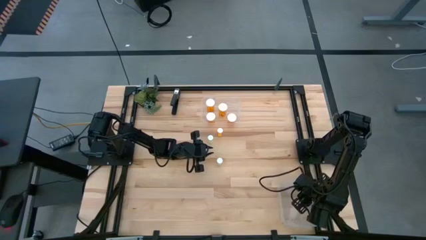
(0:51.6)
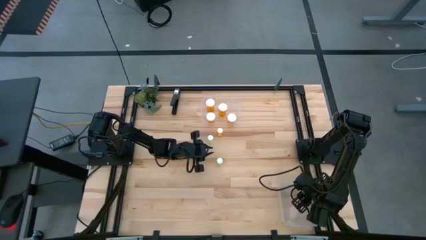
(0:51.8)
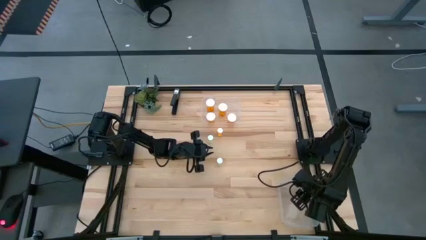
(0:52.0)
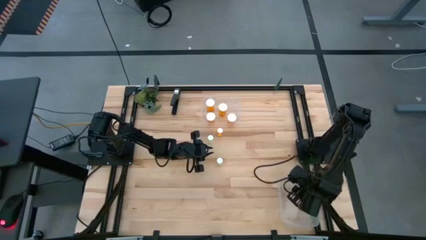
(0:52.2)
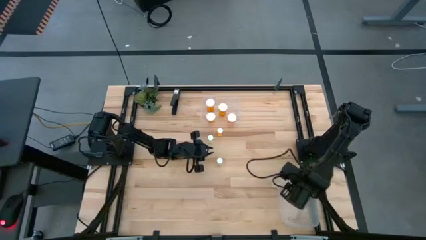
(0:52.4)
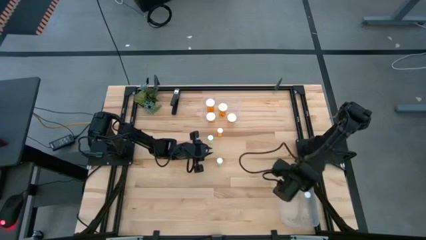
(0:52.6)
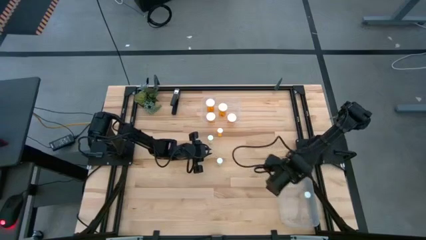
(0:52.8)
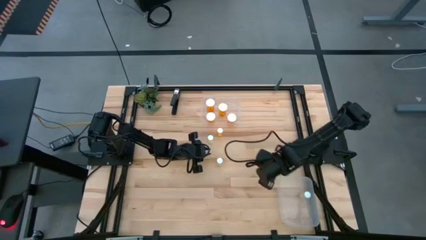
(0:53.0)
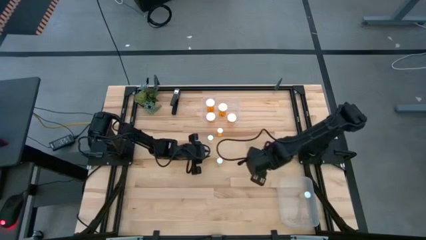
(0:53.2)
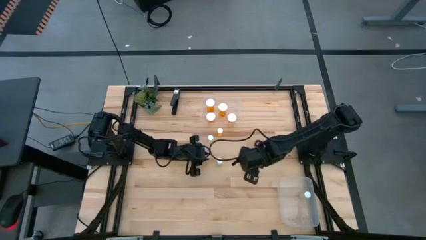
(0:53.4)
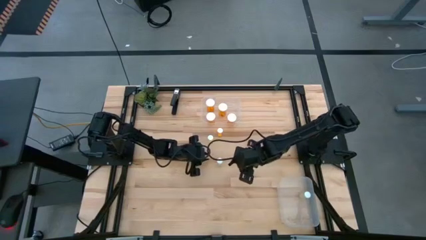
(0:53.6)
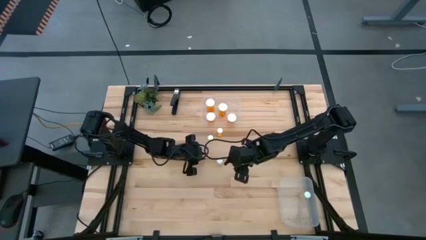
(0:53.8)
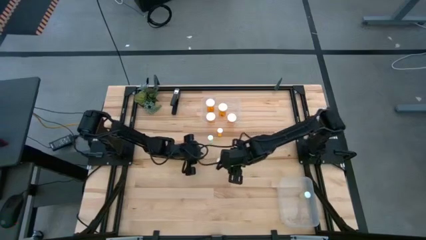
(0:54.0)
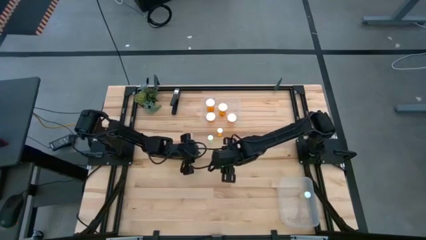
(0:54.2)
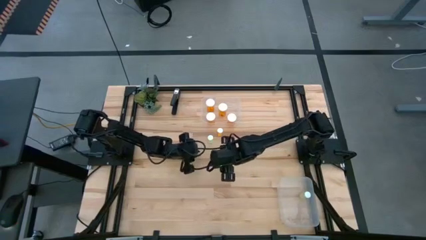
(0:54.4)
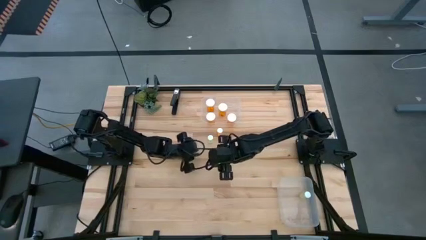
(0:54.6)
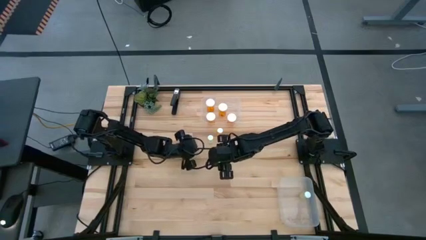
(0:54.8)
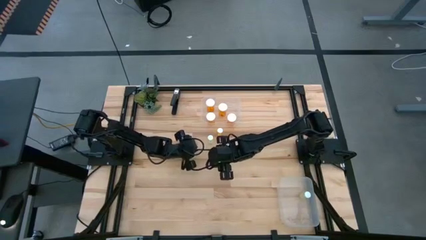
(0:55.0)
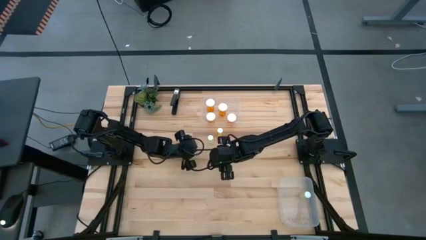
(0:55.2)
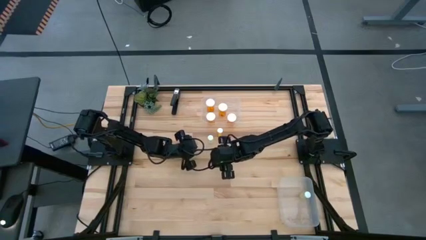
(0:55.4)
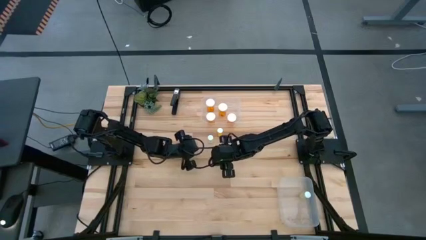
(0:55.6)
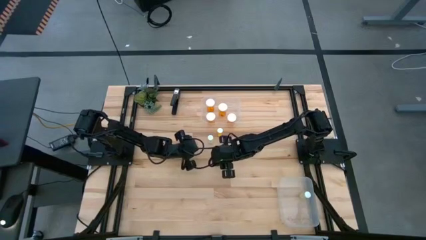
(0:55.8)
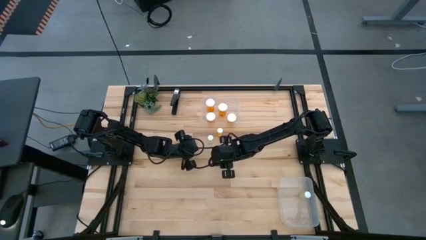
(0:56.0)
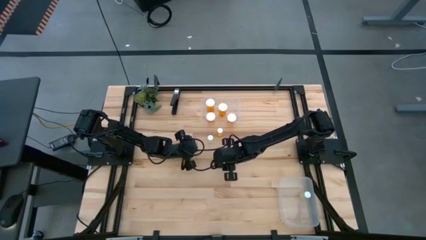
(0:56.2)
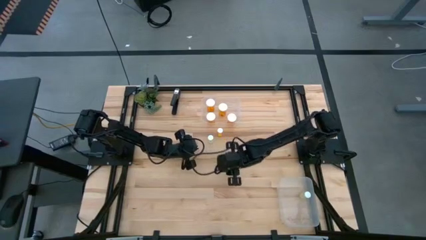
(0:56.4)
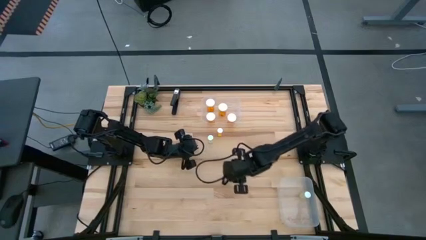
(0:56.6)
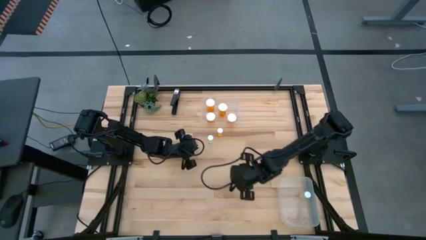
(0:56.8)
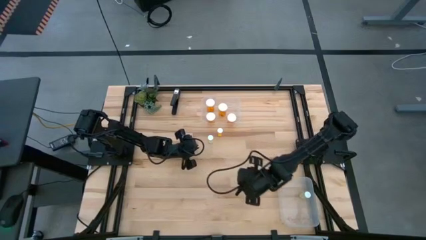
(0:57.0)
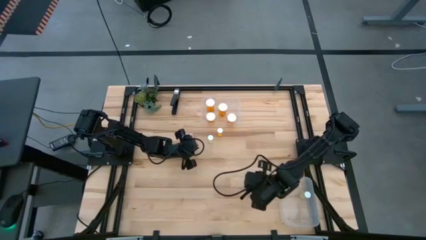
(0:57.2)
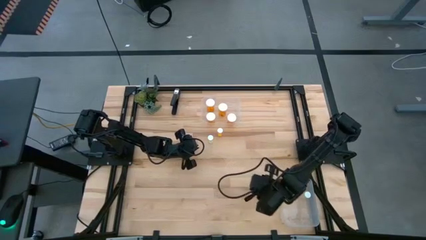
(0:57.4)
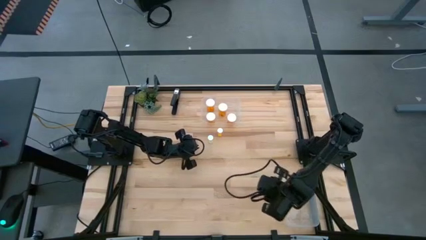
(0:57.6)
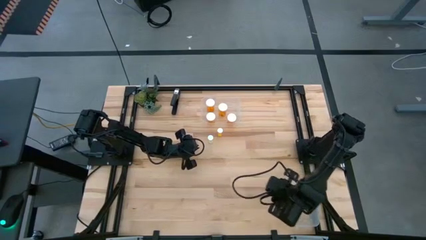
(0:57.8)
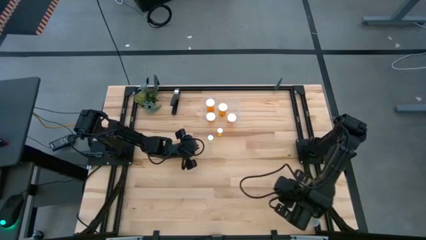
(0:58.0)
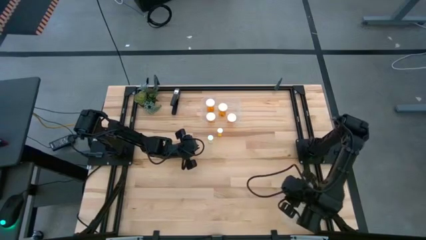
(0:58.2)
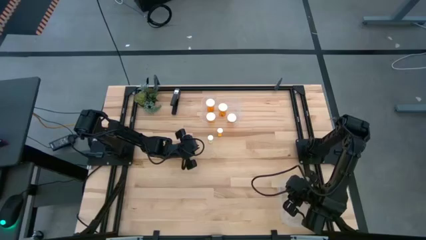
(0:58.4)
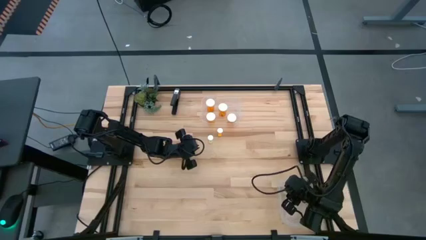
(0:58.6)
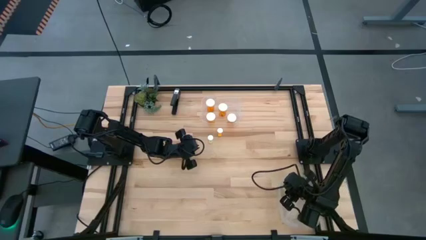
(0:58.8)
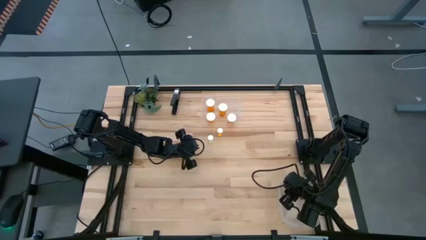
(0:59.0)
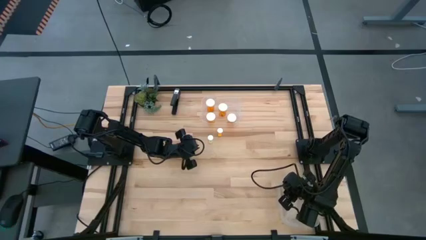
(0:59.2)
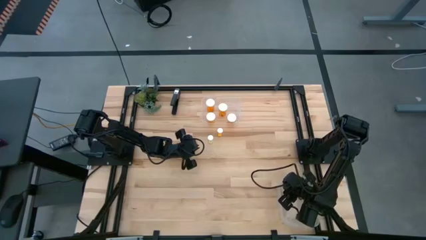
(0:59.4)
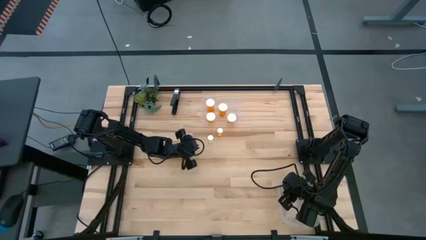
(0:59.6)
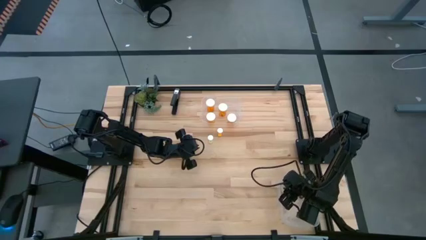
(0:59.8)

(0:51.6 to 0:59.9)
Task: Pick and place medicine bottles into bin by pill shape (circle, oval)
Put the yellow tablet bottle into the bottom transparent bin

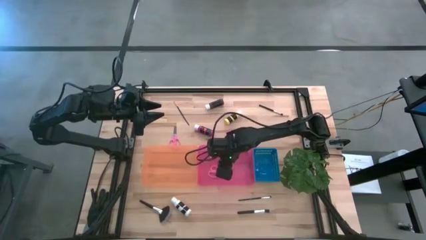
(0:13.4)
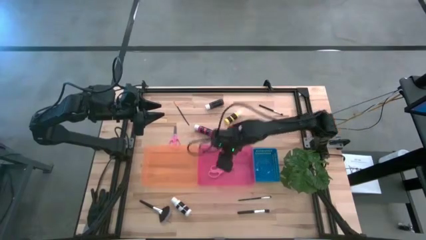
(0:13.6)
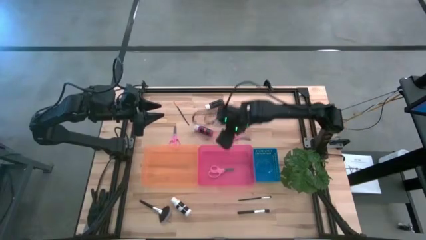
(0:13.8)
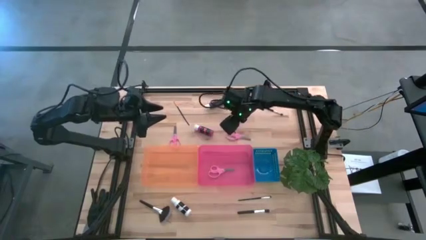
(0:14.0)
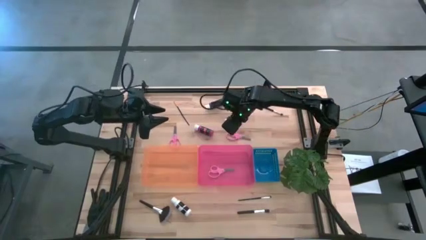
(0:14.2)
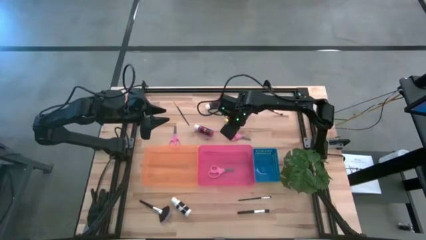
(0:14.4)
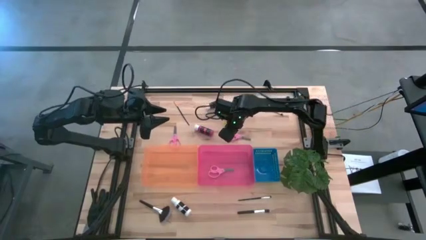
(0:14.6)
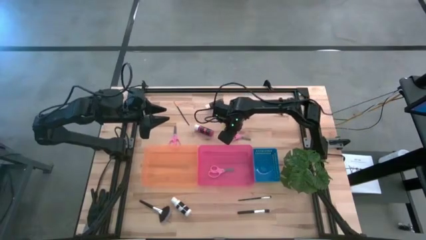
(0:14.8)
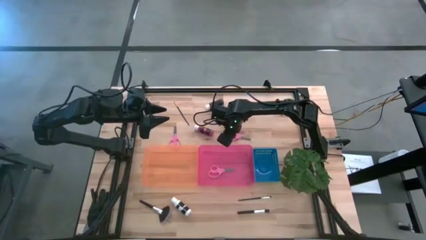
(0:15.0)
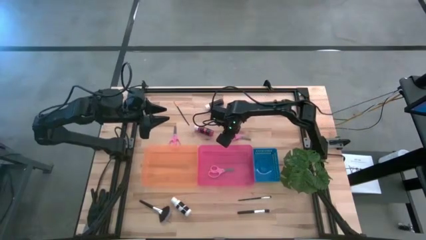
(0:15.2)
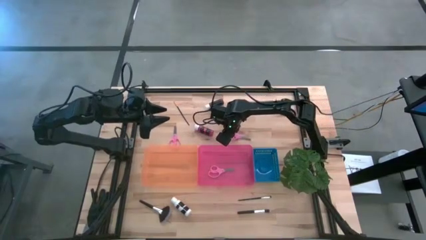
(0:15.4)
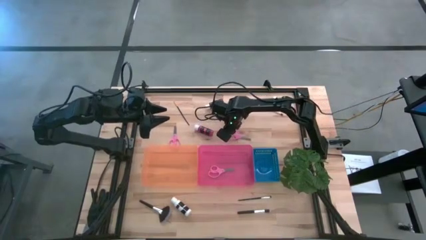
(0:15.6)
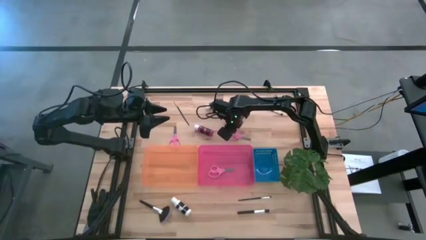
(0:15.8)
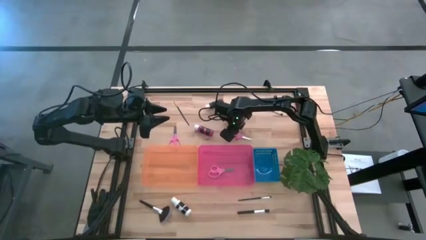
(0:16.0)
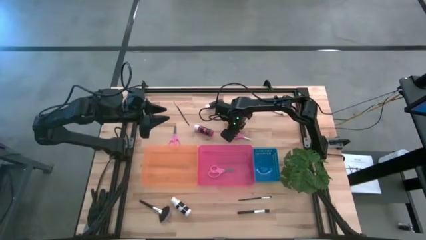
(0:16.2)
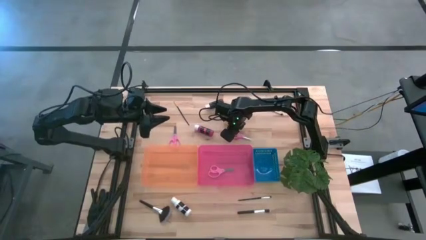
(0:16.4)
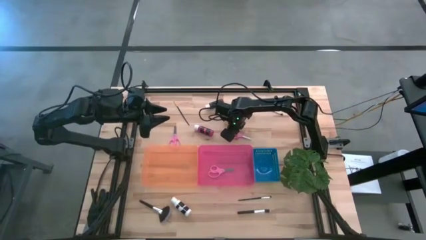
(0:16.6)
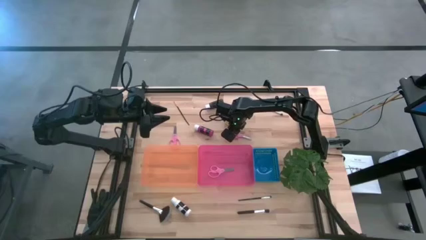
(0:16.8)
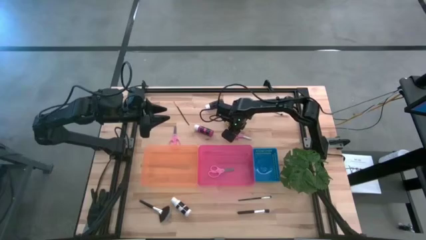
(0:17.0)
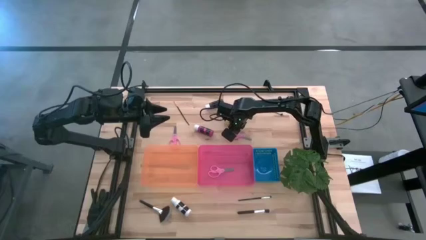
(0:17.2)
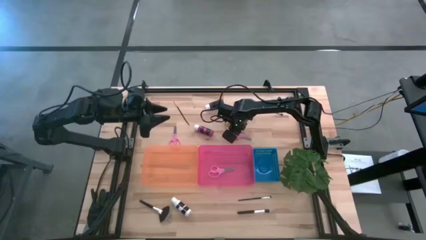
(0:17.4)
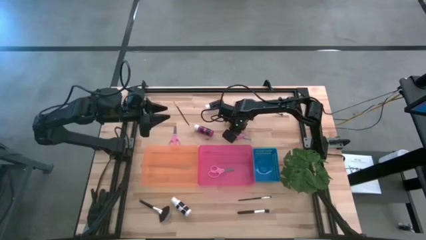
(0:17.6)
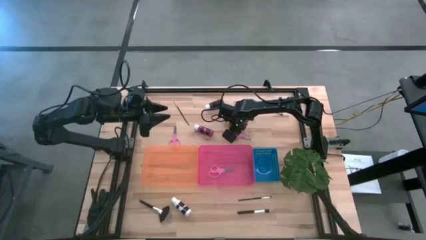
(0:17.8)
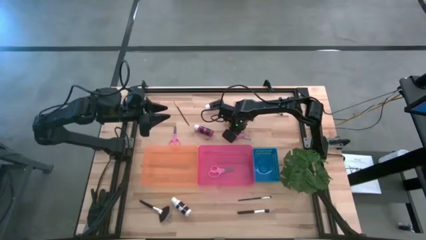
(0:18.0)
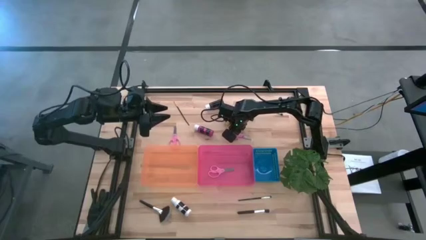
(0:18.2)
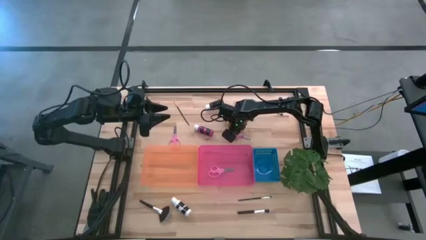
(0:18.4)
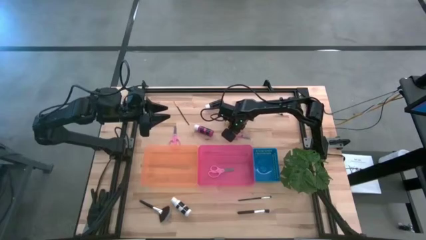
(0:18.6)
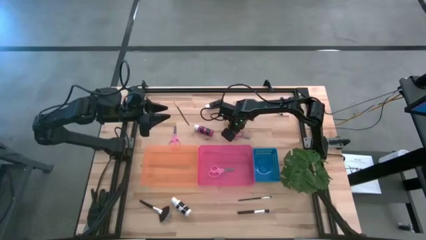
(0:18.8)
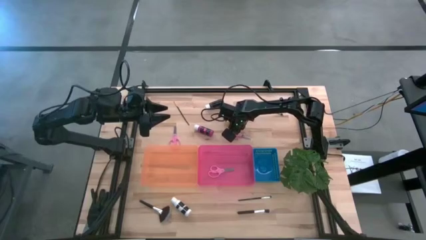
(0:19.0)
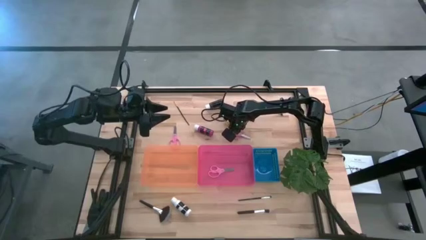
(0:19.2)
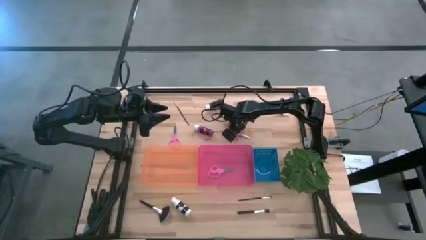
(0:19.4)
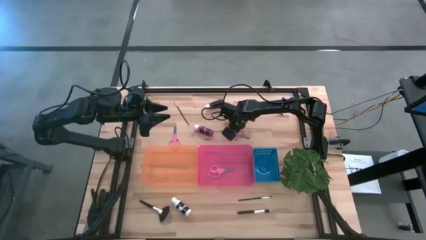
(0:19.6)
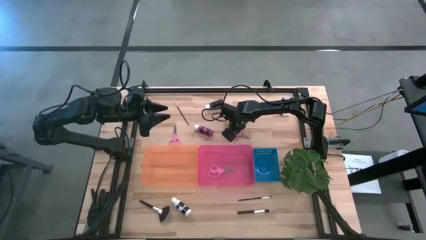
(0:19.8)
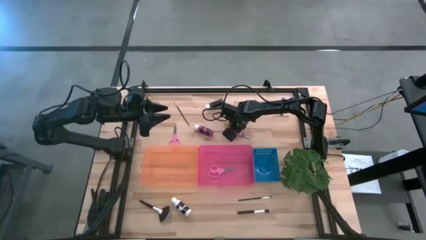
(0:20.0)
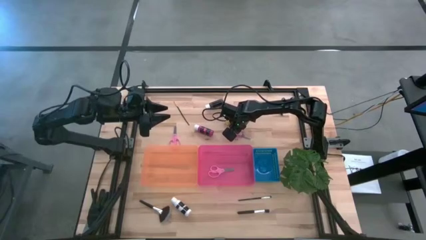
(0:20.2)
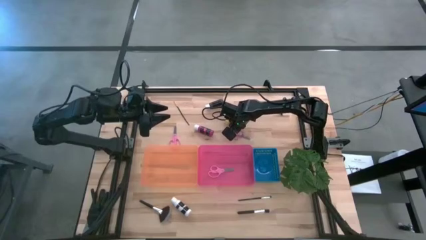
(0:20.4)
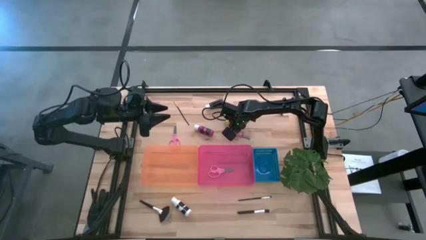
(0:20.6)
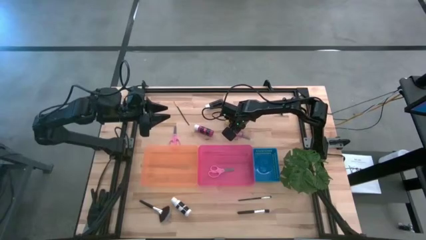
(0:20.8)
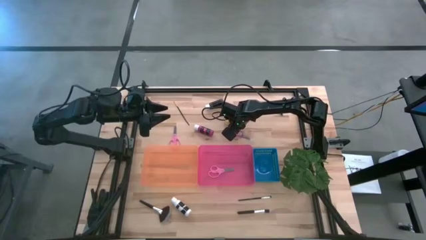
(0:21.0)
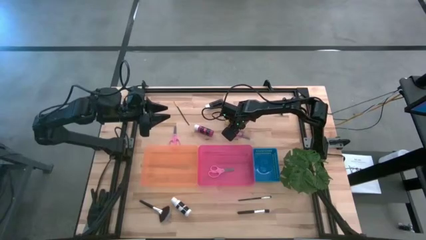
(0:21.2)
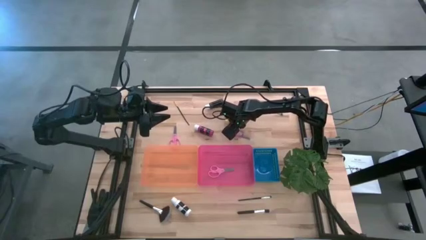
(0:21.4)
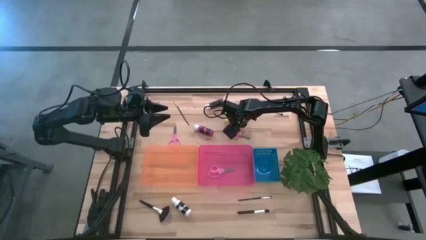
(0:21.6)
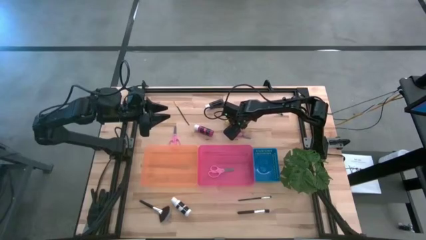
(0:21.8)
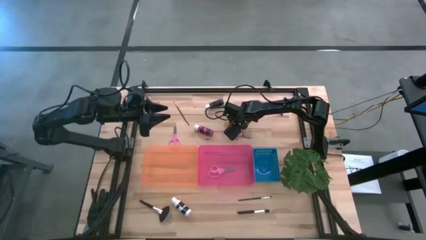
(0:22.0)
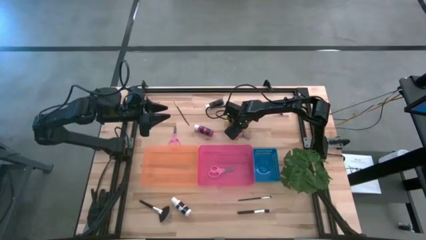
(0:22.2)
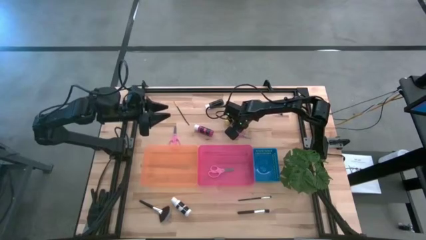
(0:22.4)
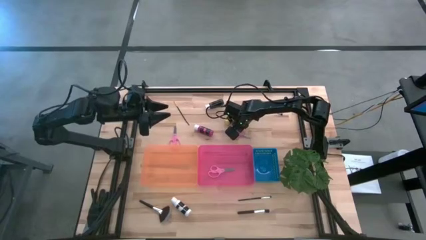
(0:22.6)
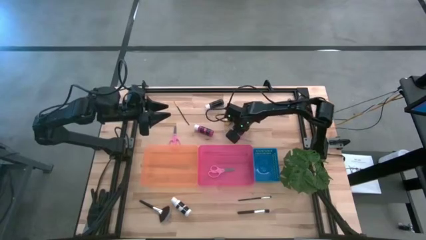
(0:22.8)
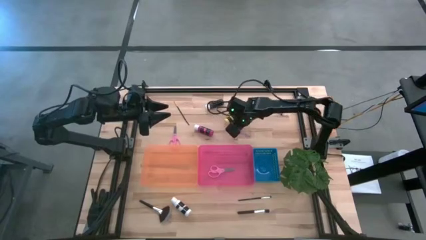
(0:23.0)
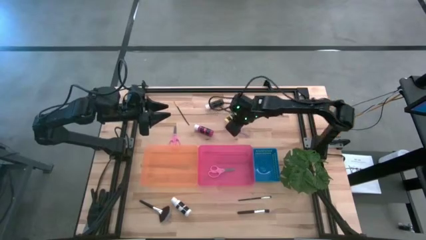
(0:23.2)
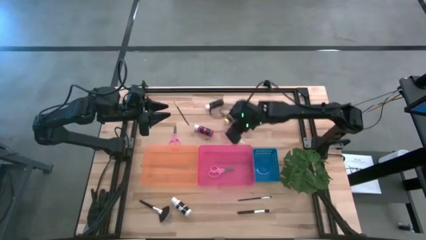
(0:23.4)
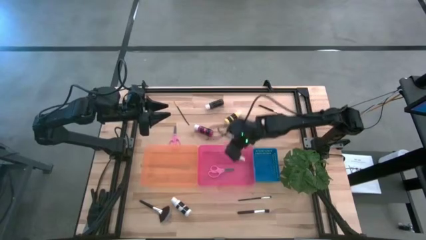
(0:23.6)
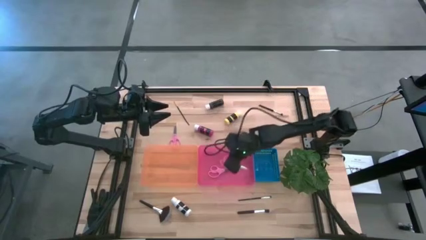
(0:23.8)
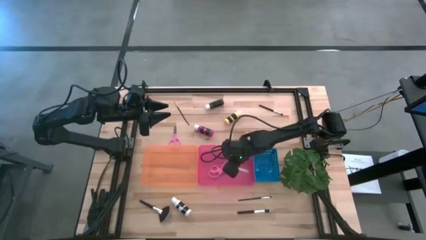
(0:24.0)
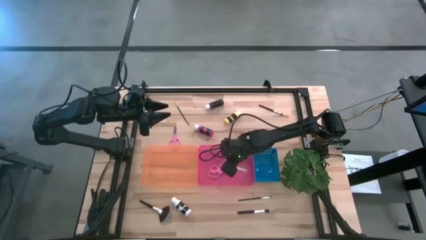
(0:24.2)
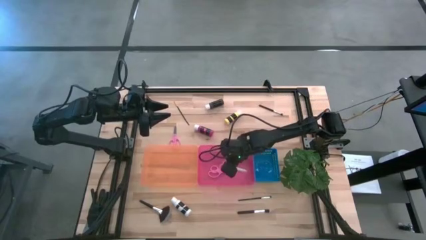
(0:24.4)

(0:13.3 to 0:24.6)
Task: Pick & Place Paint Supplies
Put the right pink scissors into the pink bin
